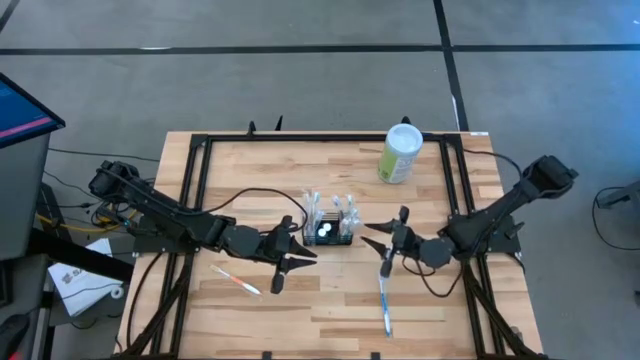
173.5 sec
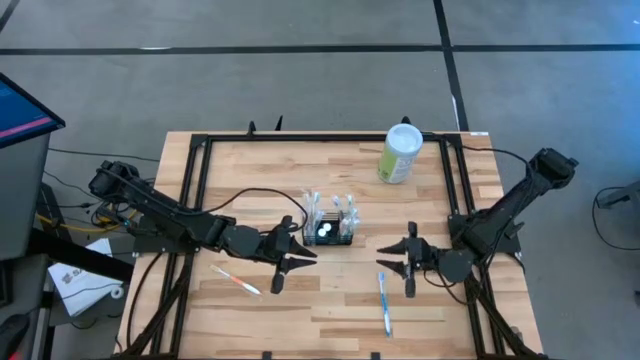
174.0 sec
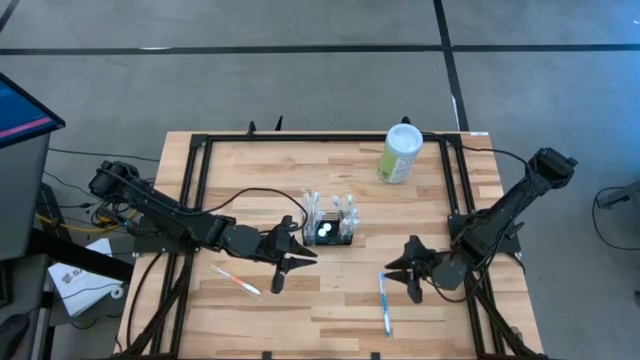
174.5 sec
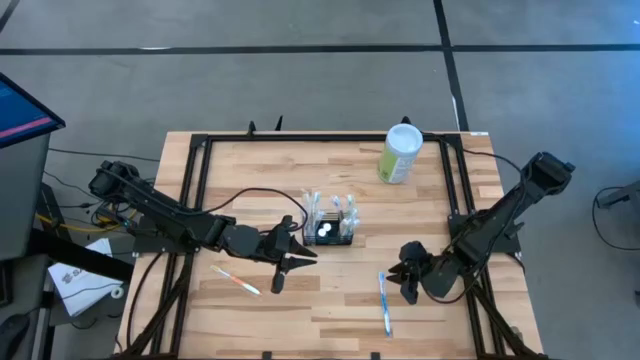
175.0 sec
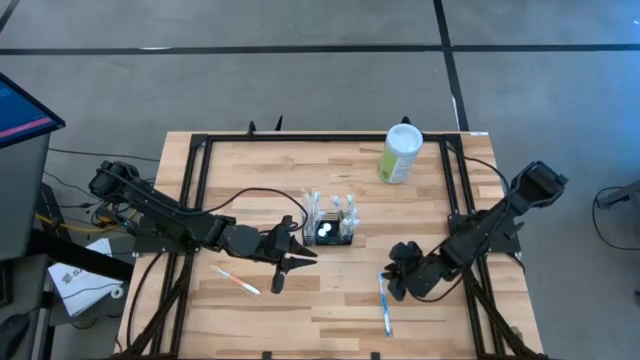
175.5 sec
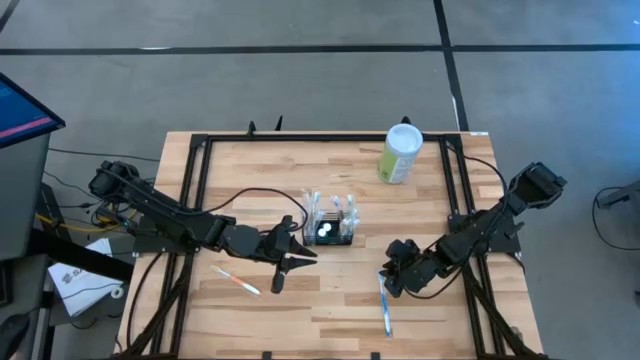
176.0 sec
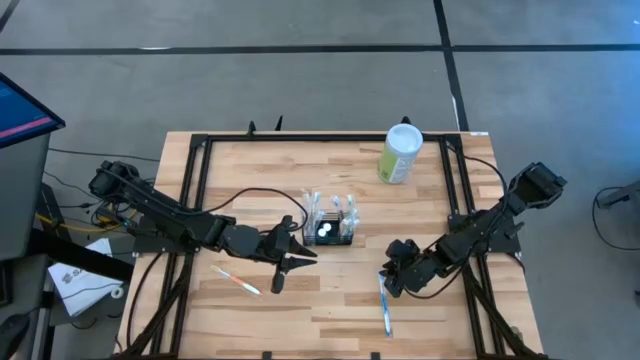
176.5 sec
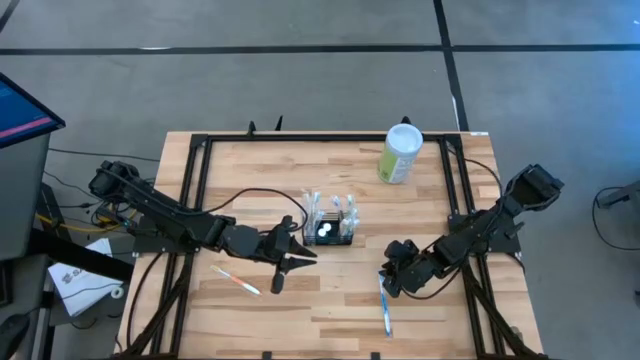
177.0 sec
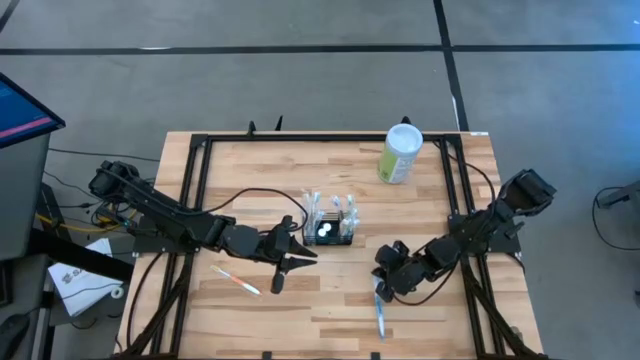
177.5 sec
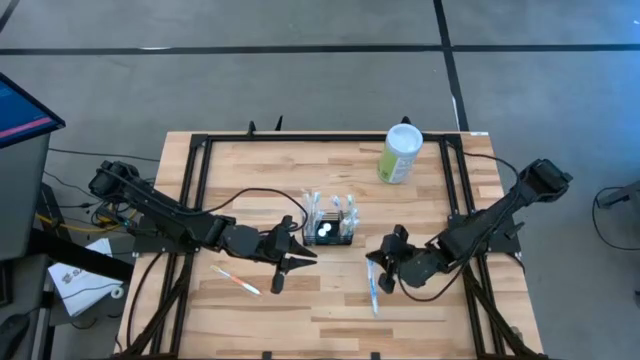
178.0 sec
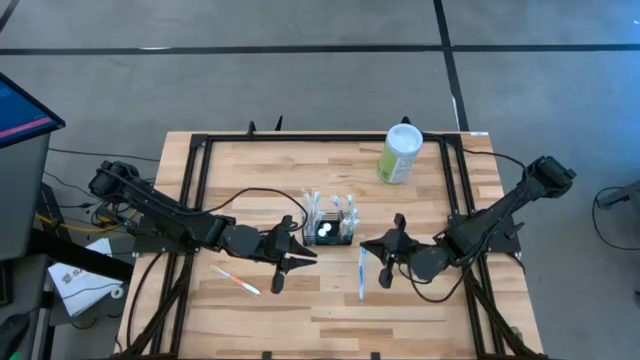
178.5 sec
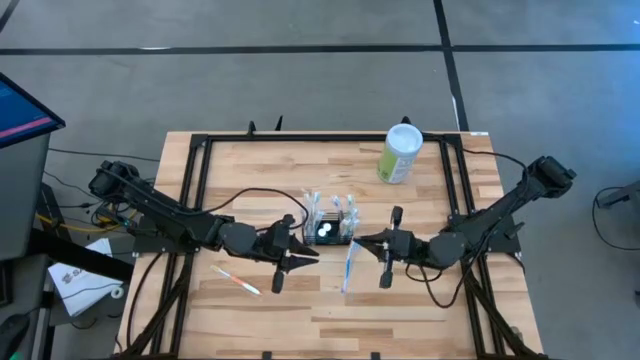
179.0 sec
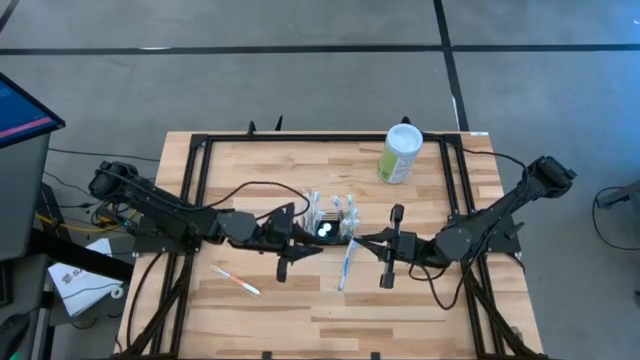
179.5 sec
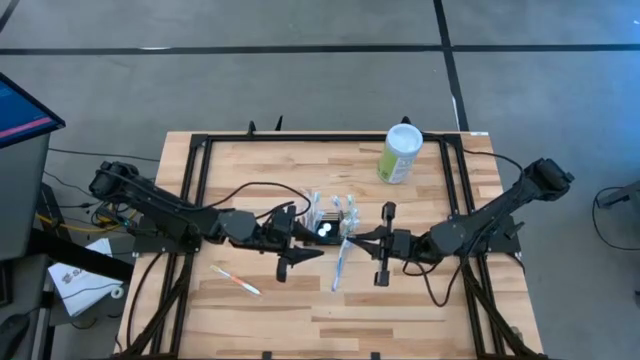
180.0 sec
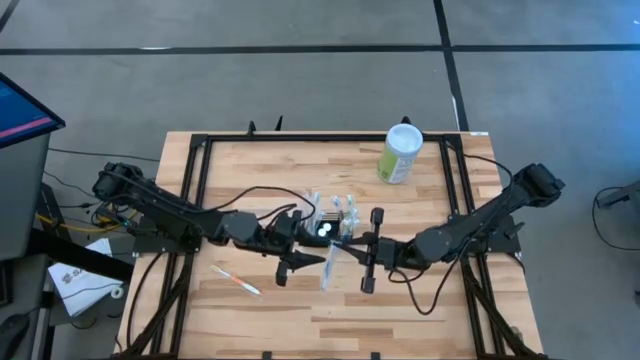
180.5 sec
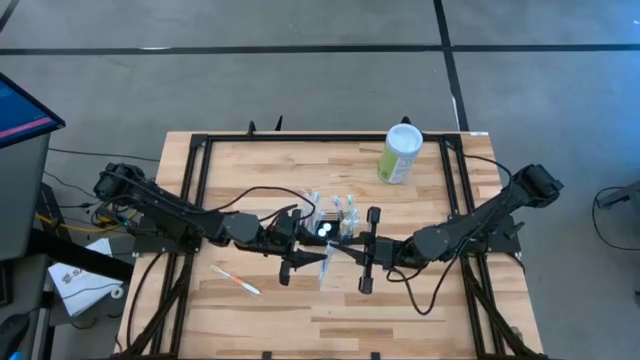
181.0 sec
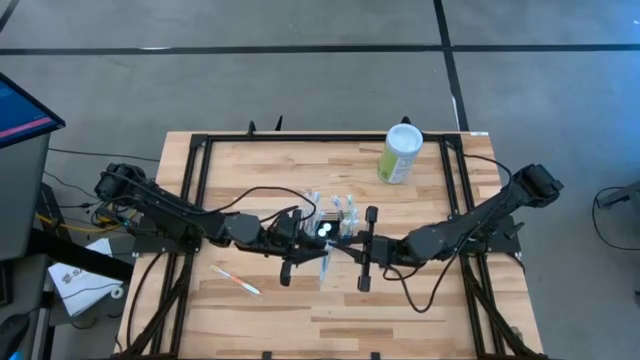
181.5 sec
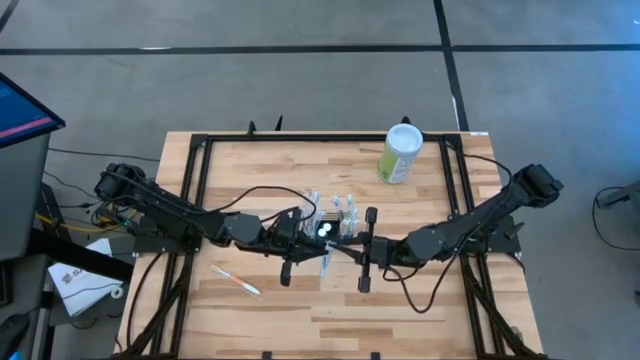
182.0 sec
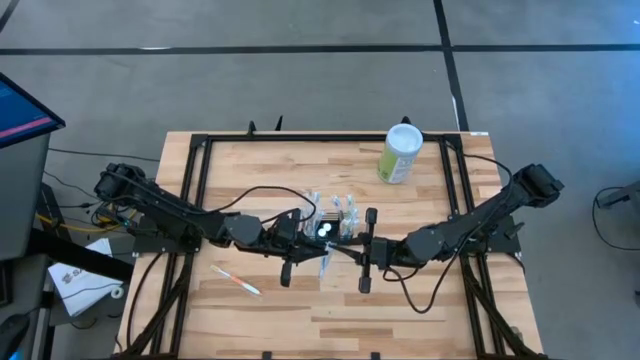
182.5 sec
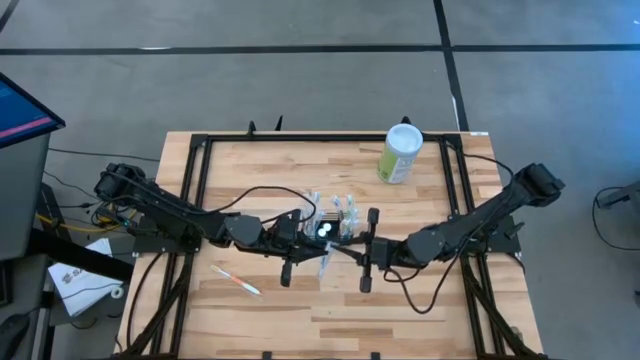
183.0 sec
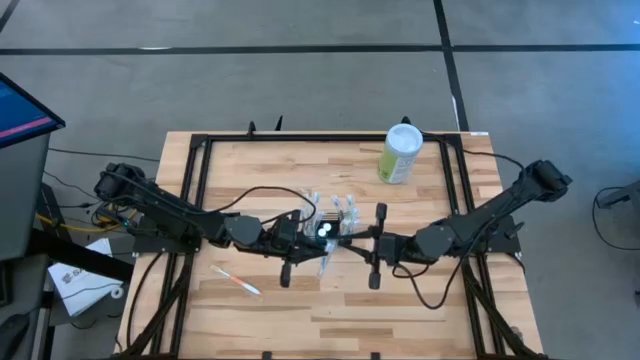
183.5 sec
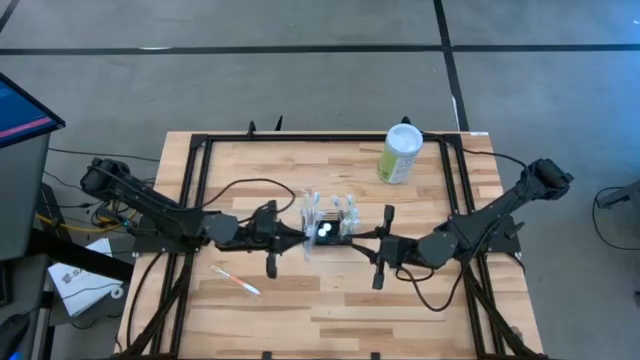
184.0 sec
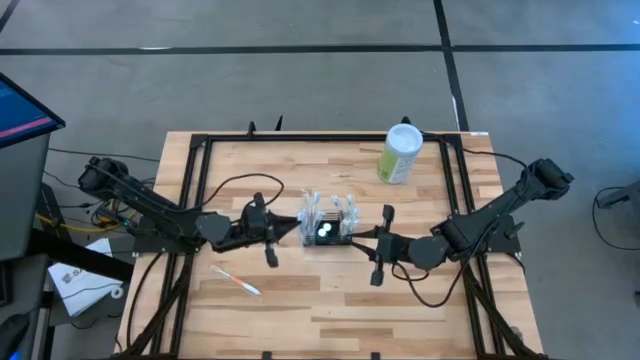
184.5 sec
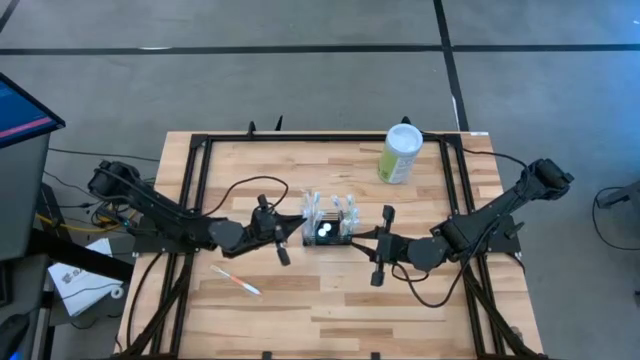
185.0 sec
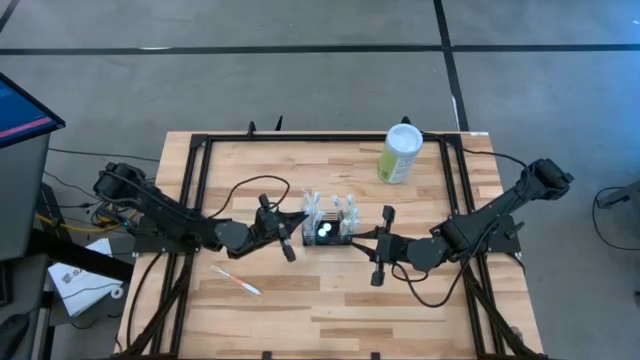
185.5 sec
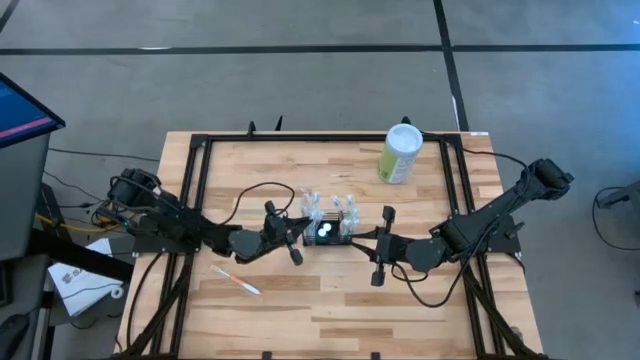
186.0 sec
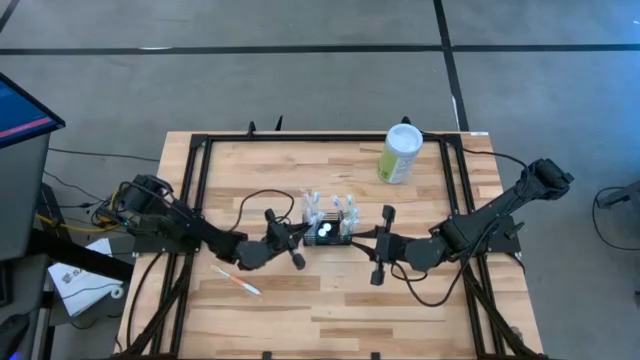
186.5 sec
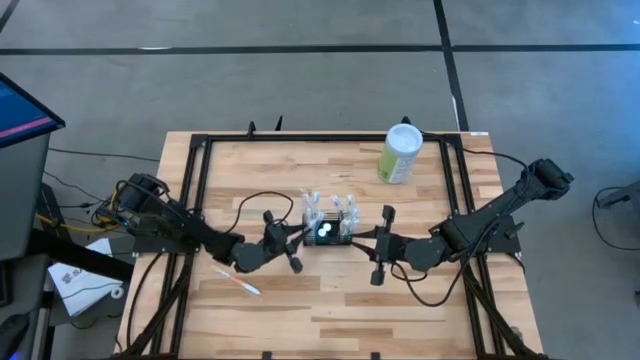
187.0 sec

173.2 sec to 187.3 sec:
Task: Pick & Place toothbrushing station
Put the blue toothbrush into the left compartment of the organizer

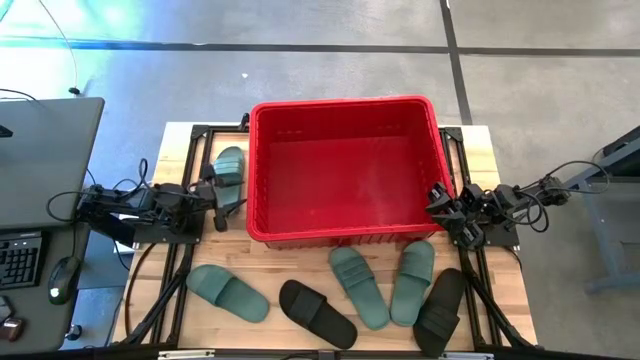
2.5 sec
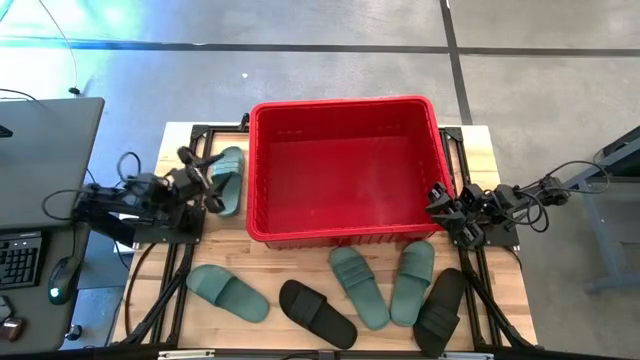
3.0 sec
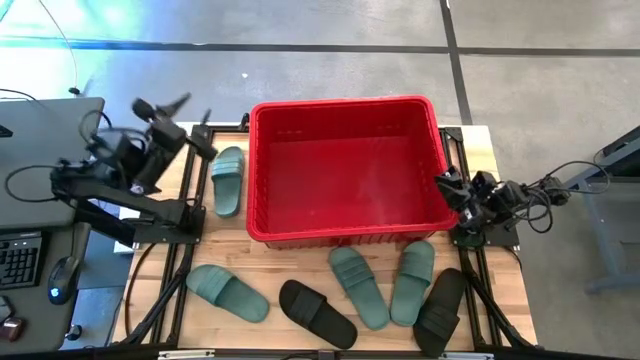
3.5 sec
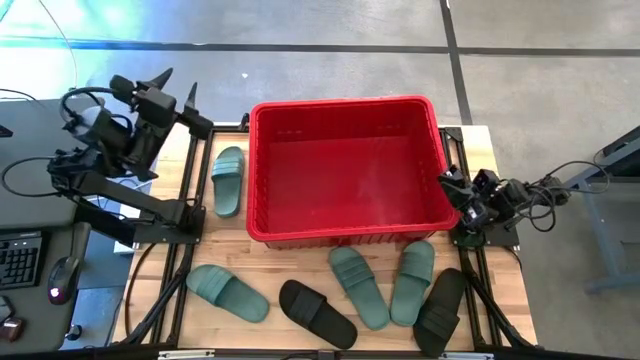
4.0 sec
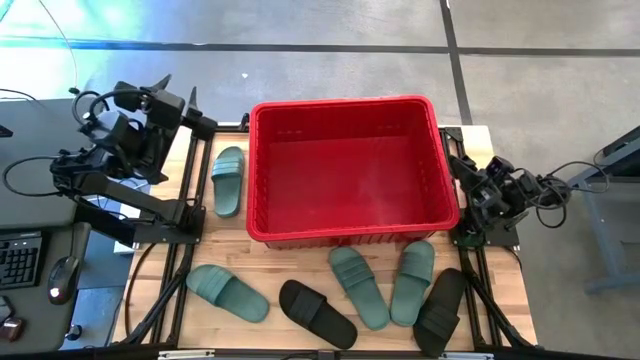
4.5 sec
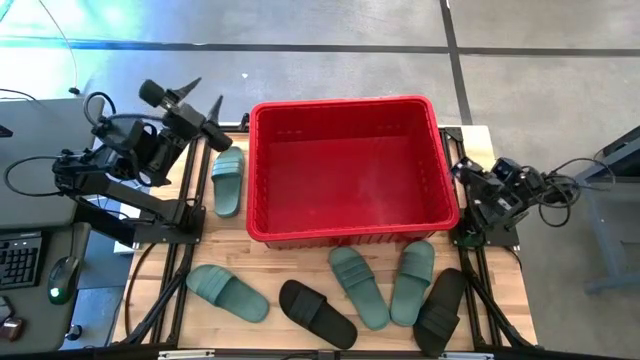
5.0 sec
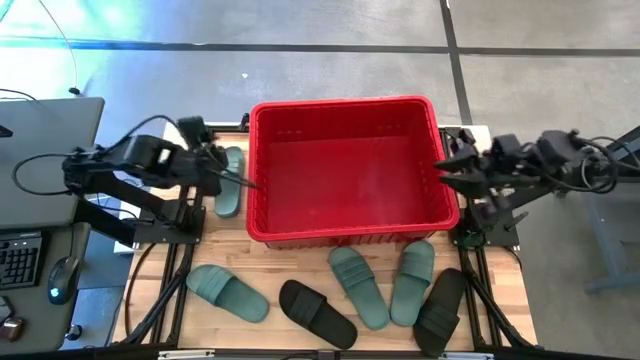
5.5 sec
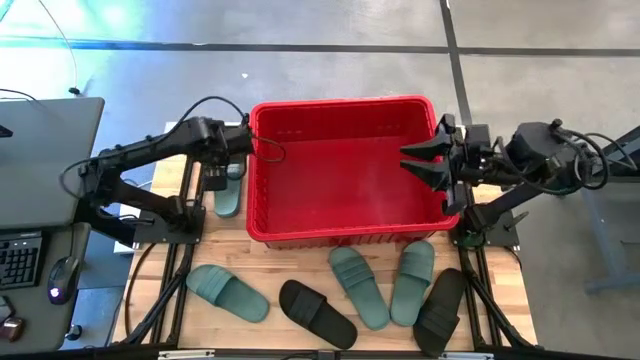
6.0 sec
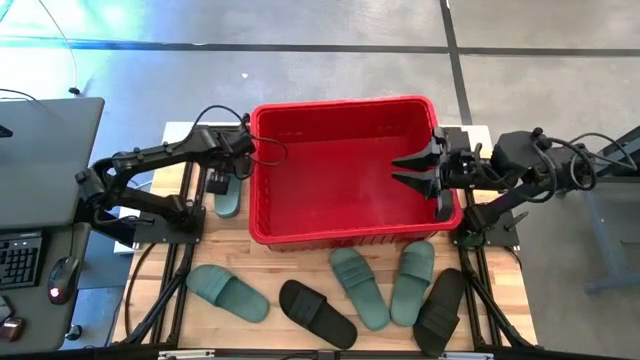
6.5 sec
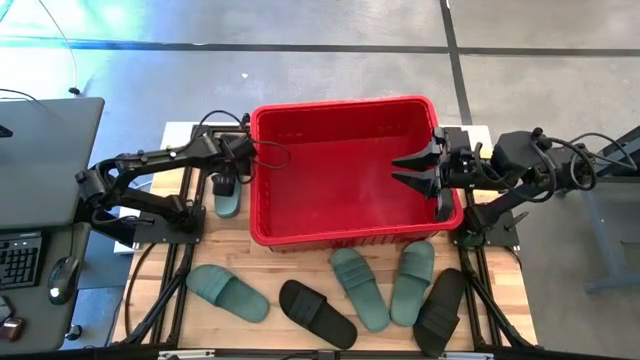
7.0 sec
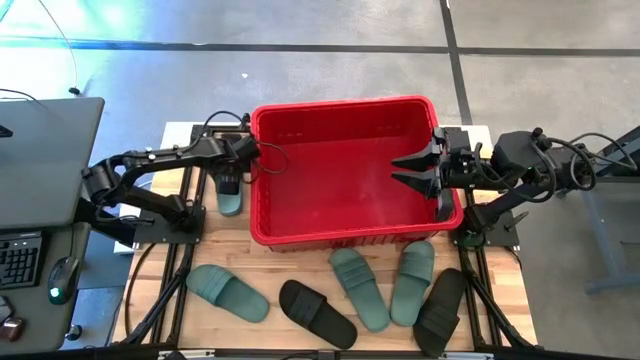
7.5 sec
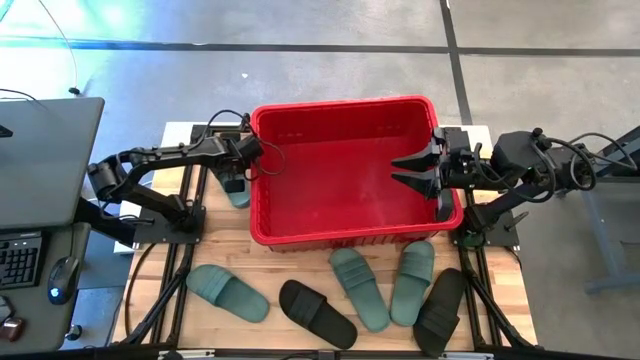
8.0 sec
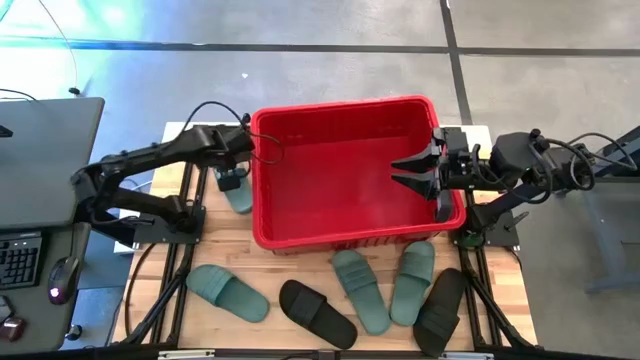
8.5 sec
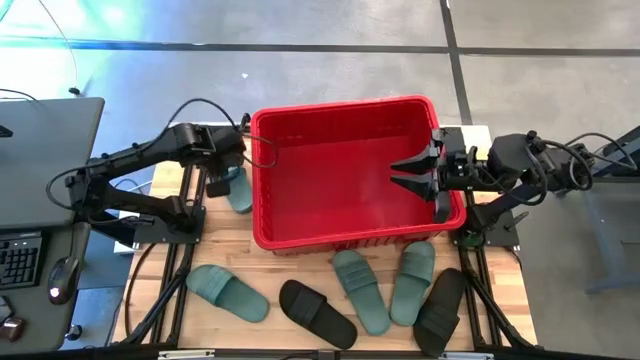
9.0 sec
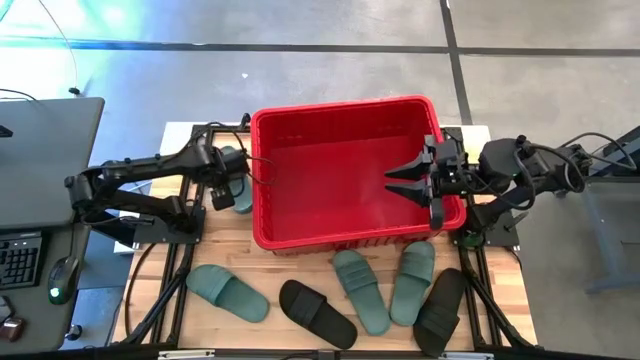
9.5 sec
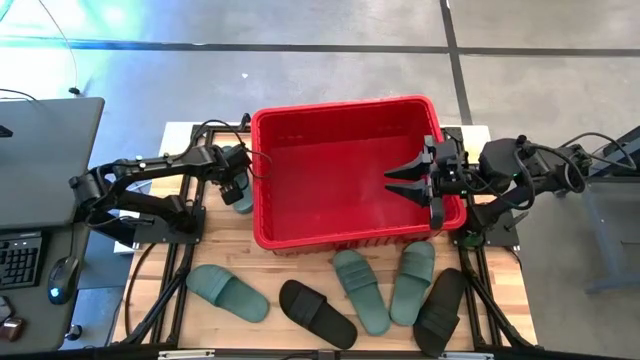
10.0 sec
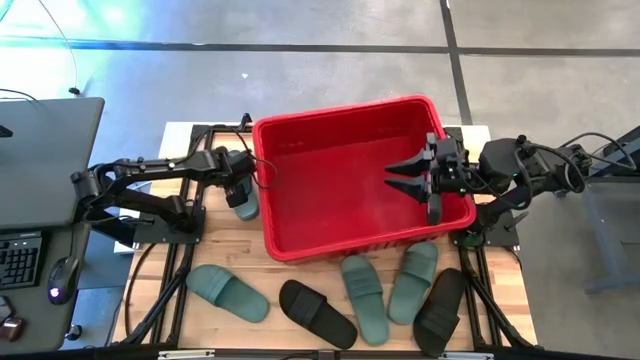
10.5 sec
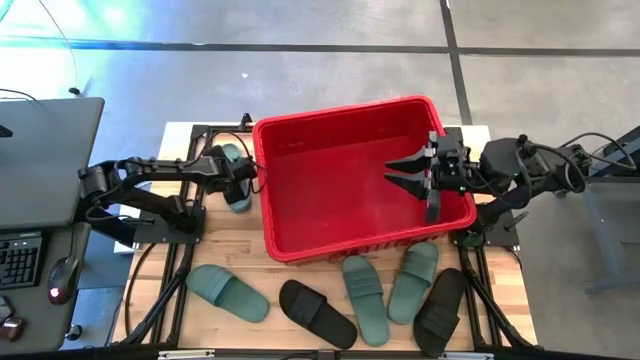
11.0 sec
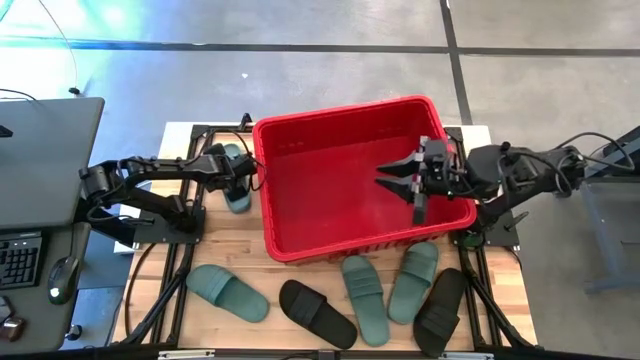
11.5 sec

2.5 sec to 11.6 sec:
Task: Pick and place slides into bin
Put the green slipper into the red bin
